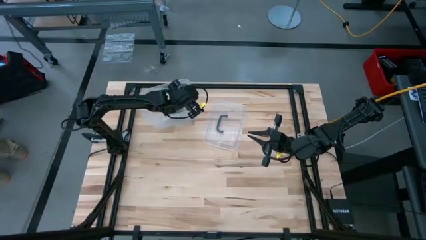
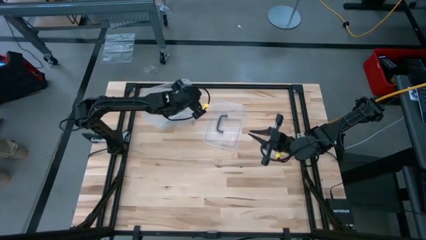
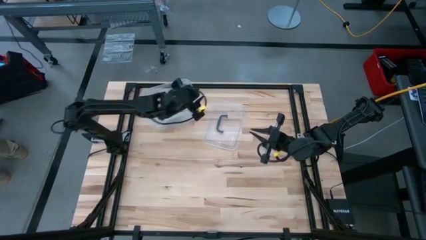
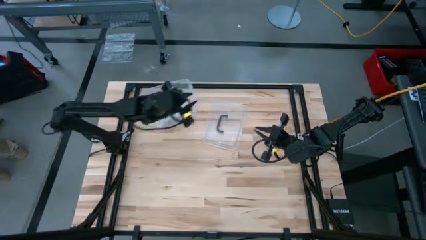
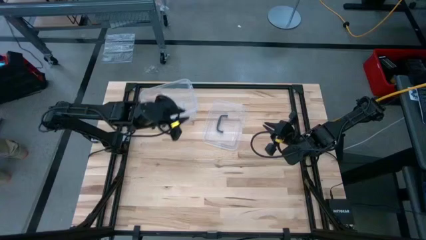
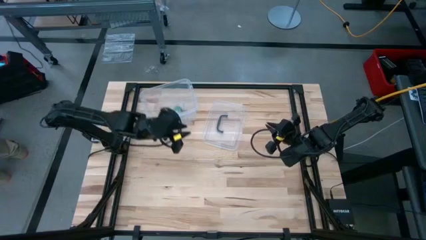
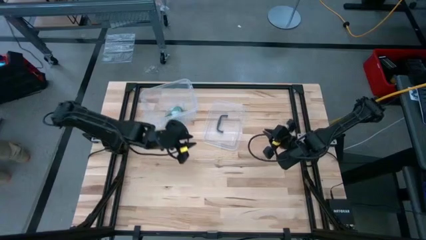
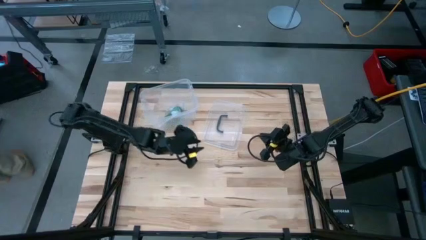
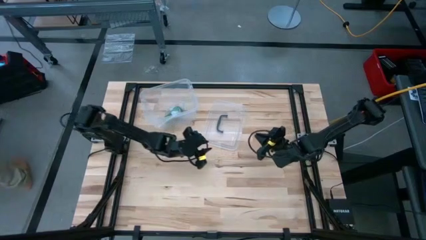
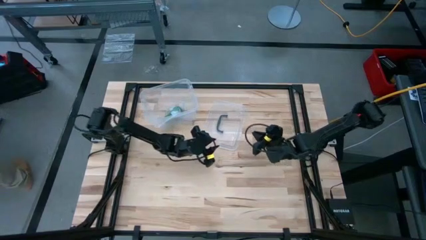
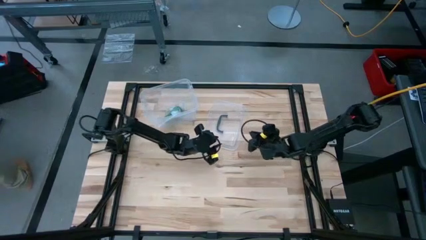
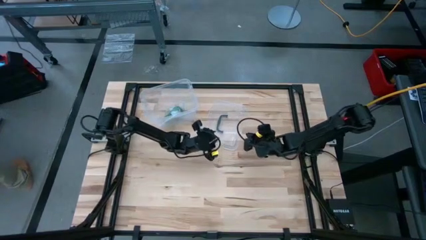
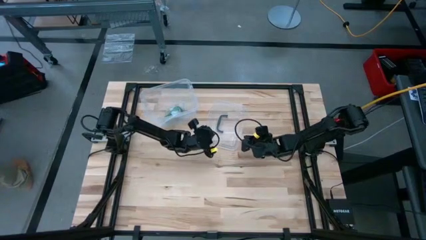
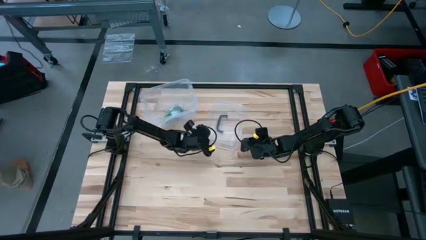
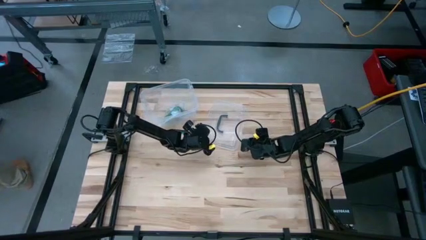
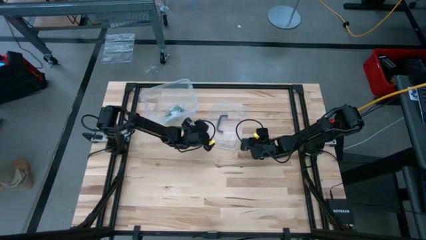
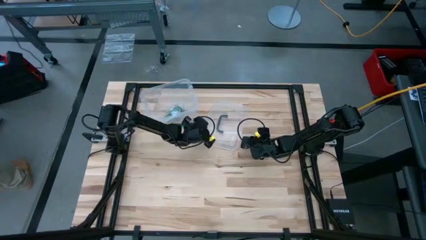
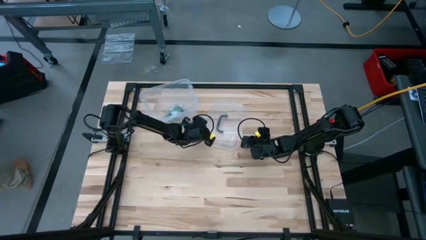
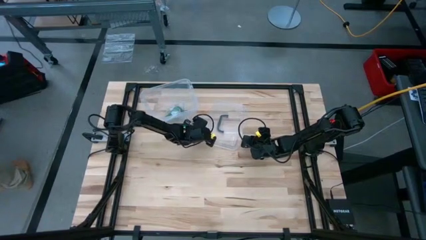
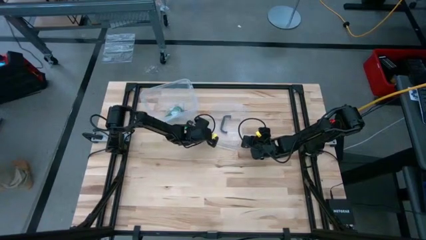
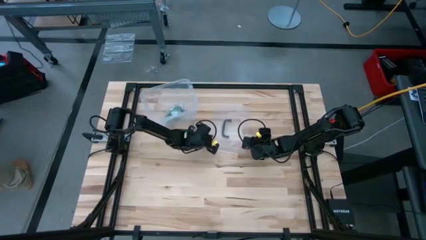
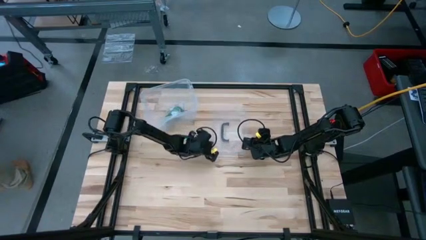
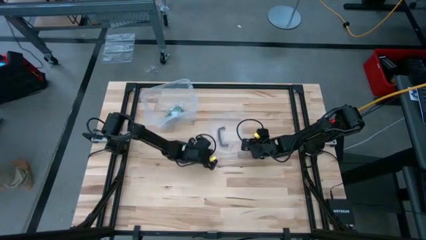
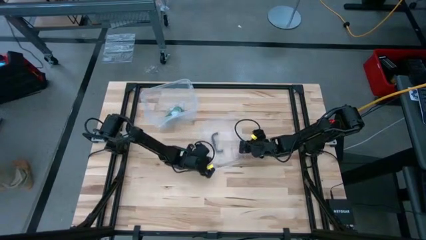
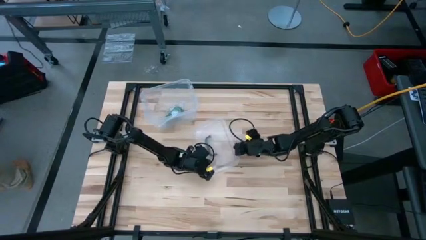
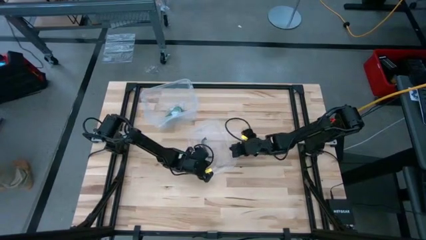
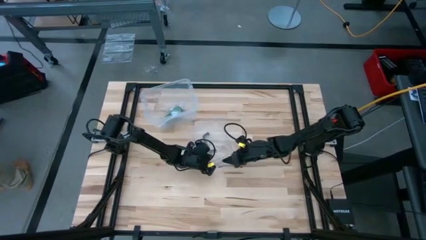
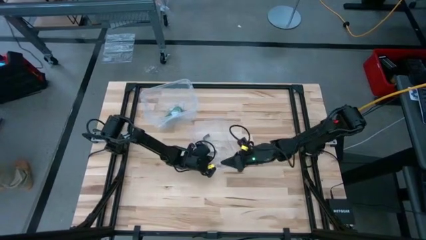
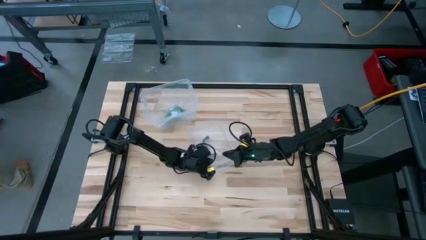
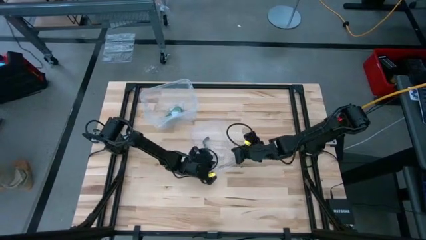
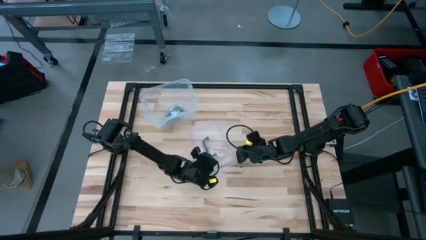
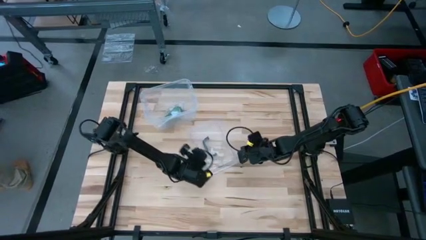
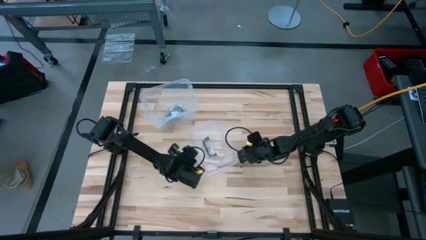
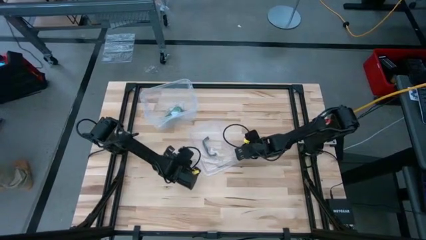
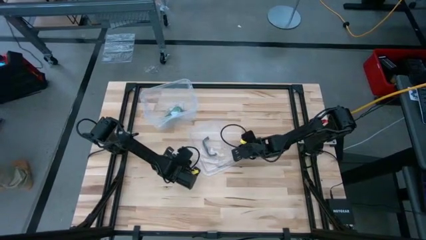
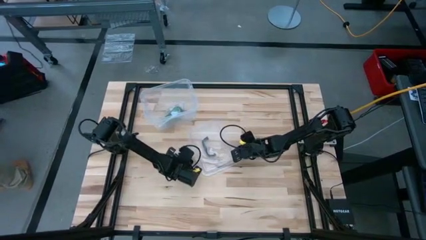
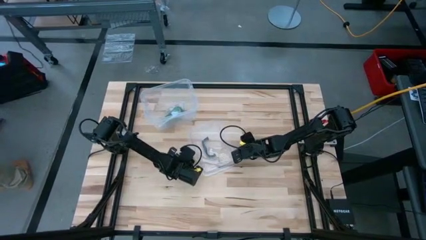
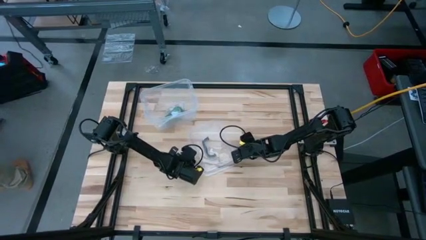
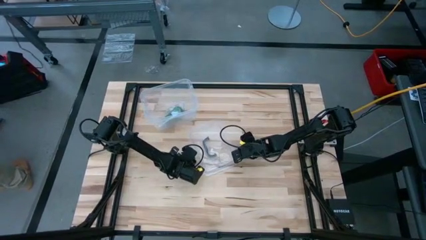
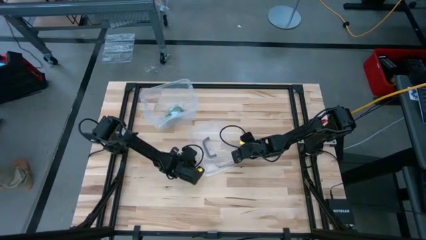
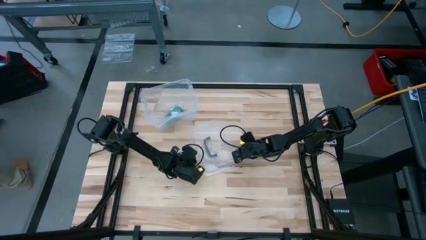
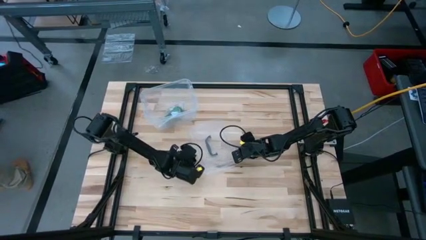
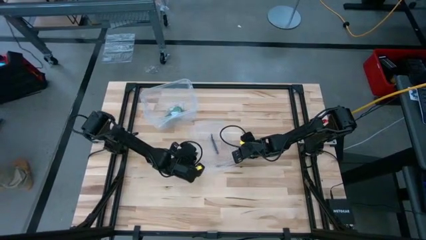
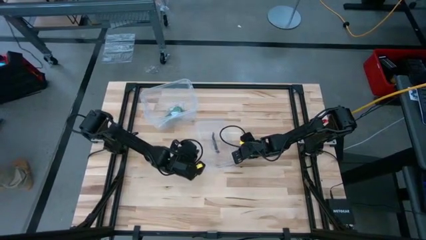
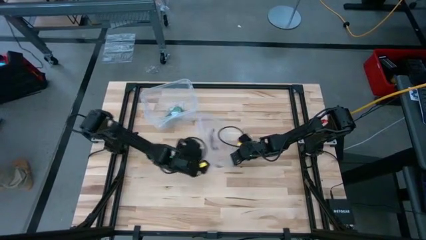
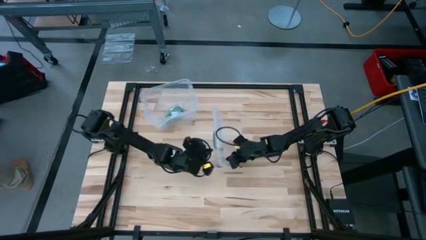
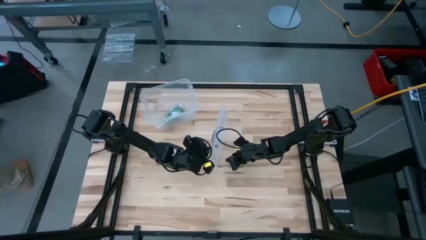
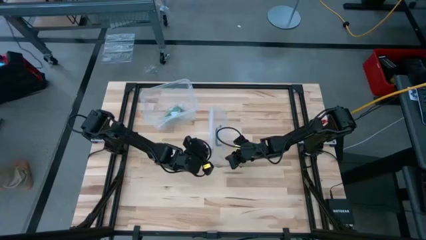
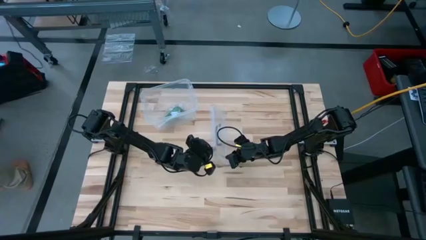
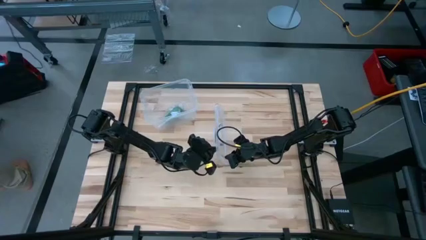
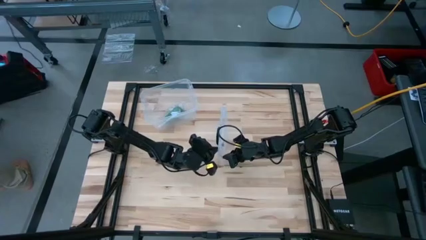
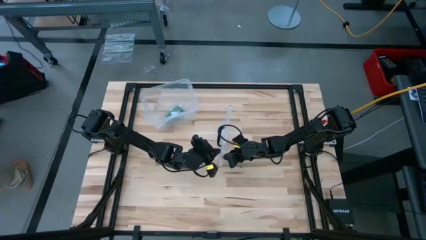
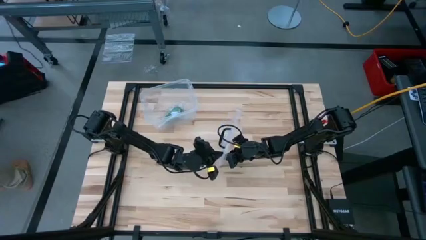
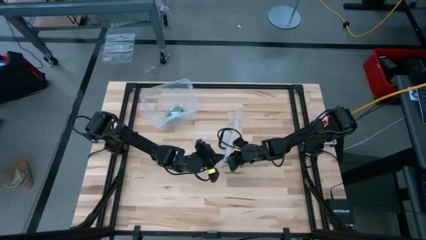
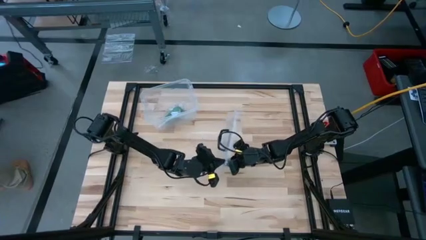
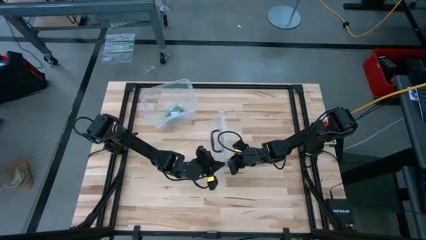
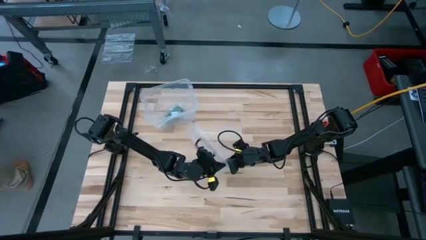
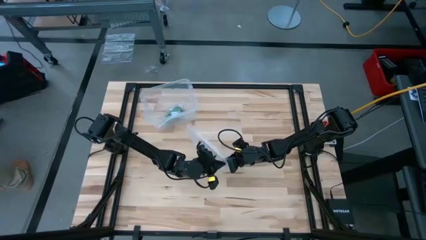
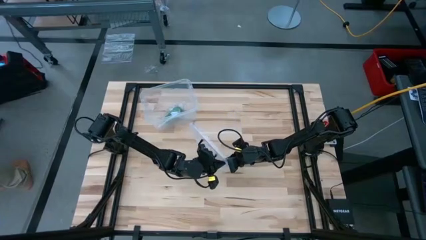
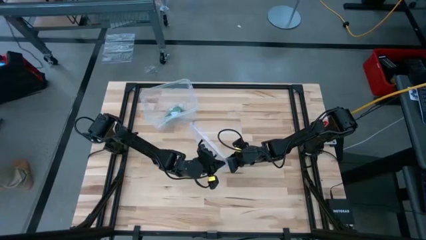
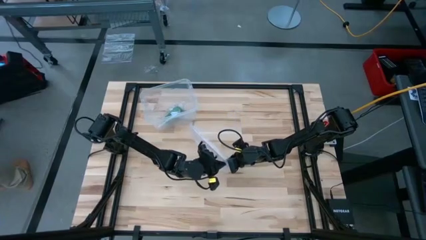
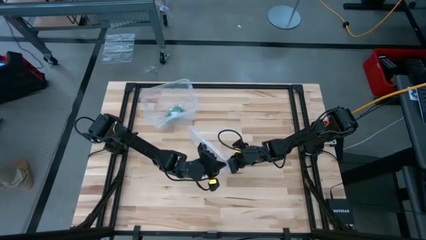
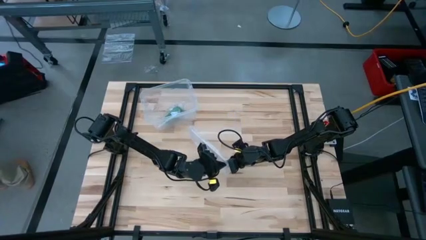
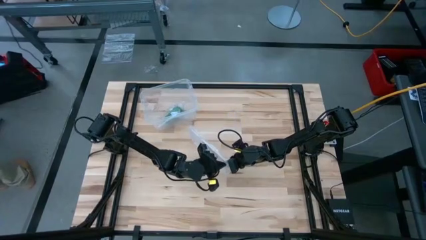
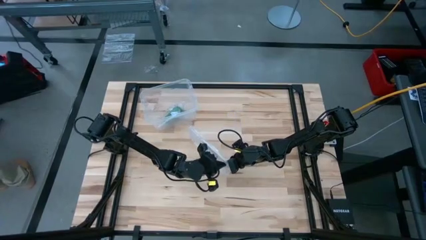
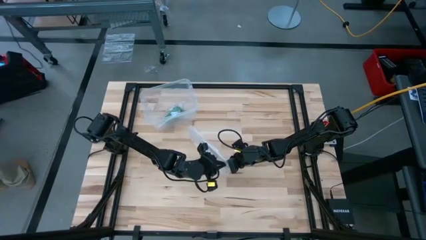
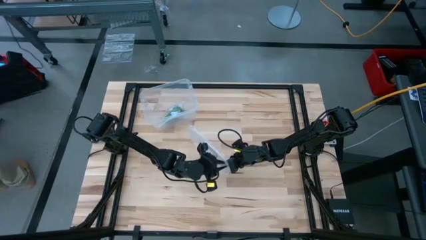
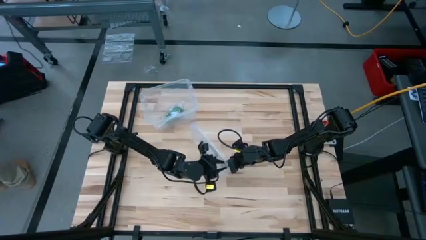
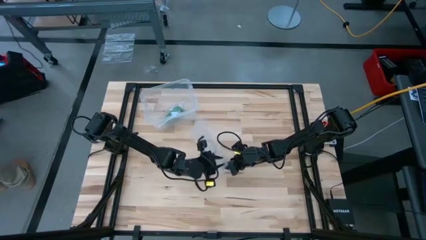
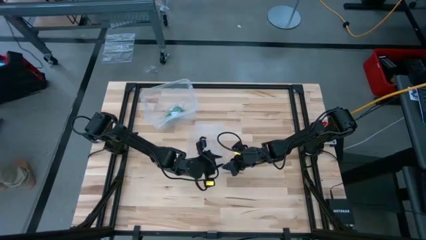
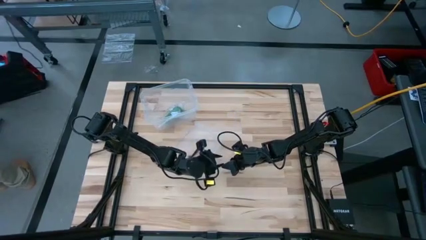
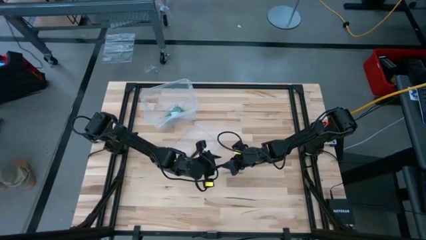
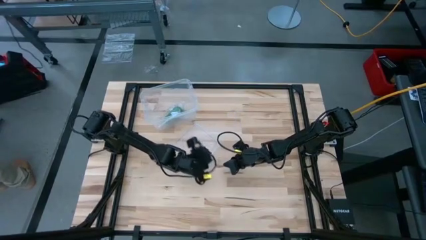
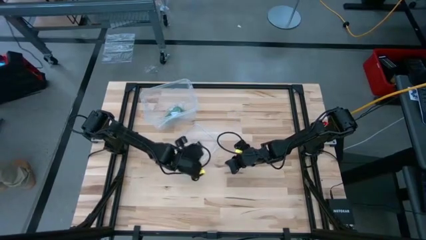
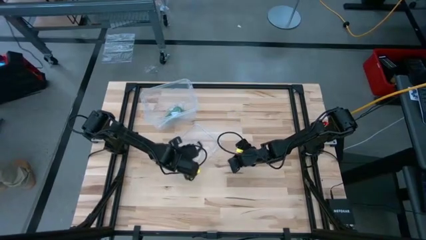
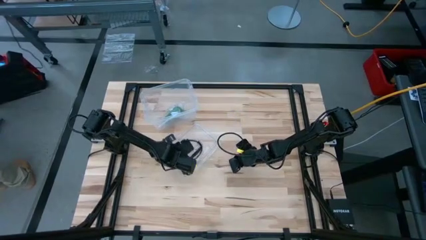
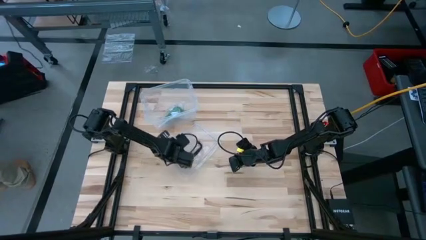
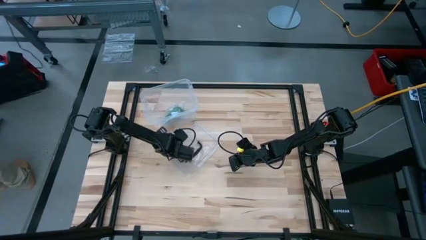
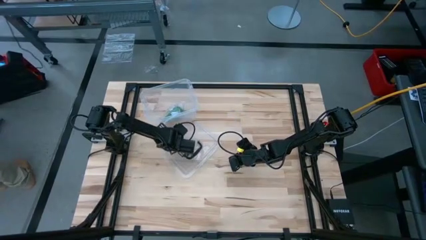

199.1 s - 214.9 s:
Task: Roll bandage
Close the transparent bin with the transparent bin cover
